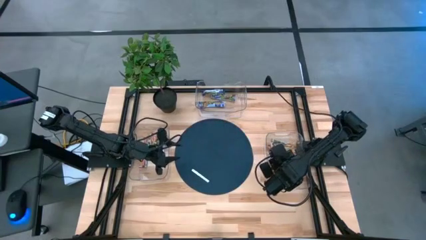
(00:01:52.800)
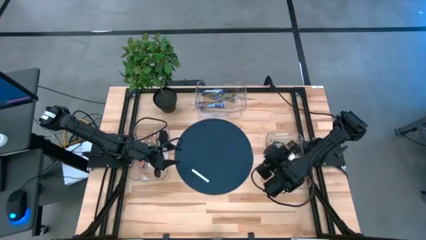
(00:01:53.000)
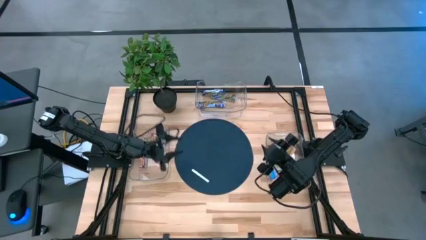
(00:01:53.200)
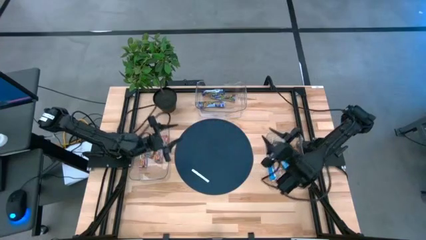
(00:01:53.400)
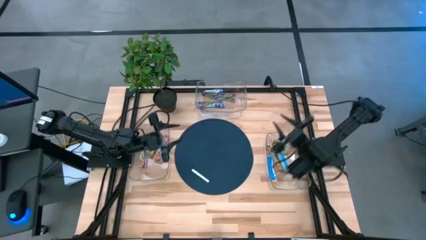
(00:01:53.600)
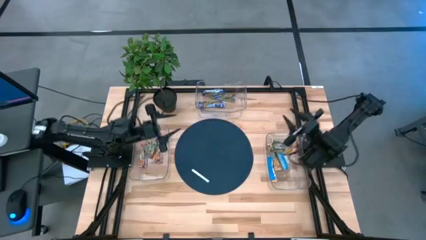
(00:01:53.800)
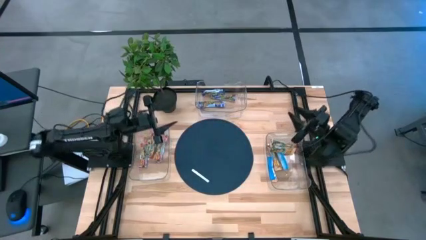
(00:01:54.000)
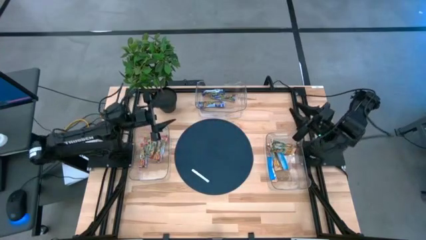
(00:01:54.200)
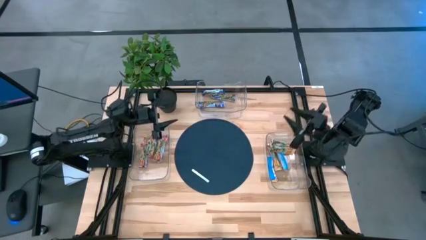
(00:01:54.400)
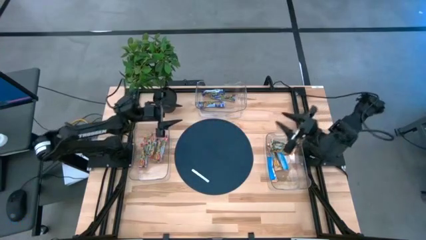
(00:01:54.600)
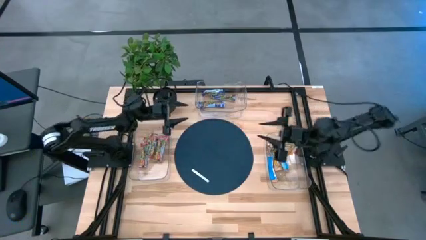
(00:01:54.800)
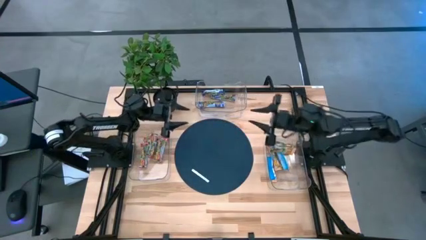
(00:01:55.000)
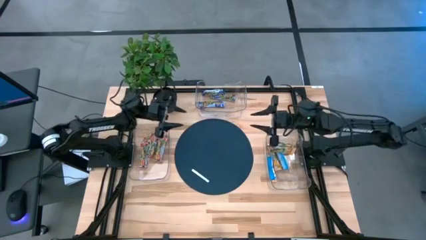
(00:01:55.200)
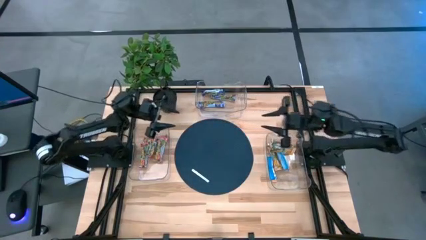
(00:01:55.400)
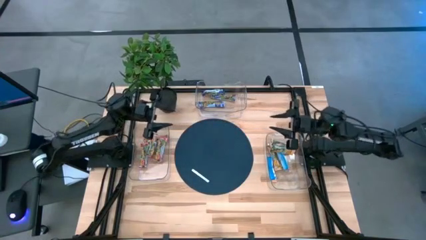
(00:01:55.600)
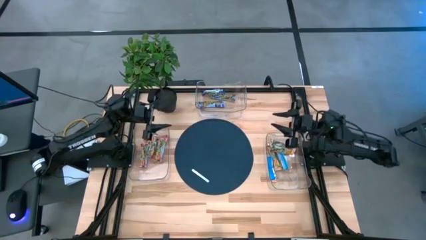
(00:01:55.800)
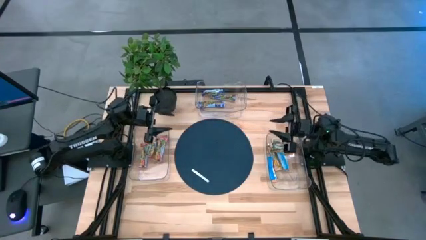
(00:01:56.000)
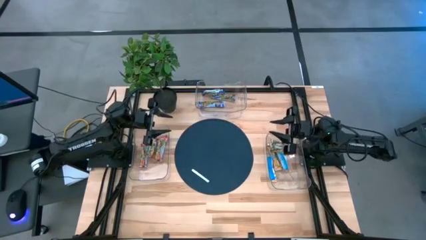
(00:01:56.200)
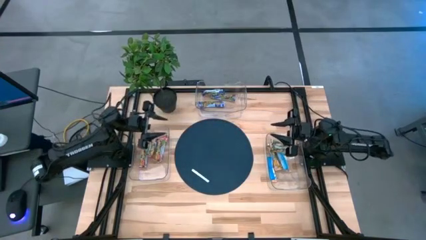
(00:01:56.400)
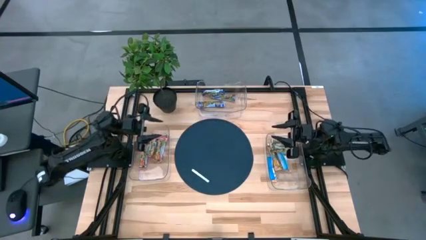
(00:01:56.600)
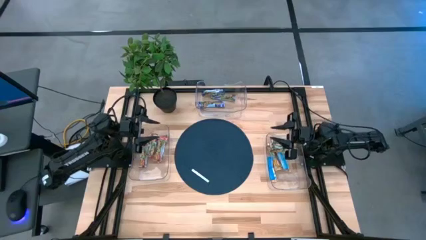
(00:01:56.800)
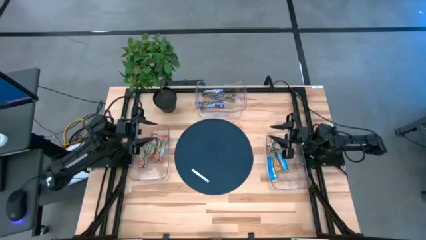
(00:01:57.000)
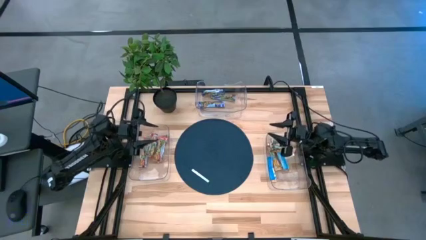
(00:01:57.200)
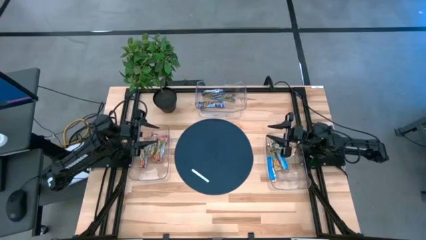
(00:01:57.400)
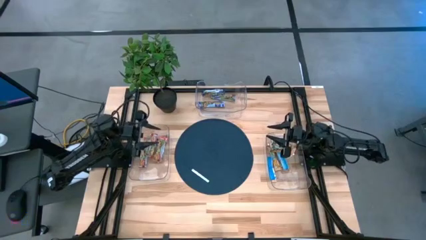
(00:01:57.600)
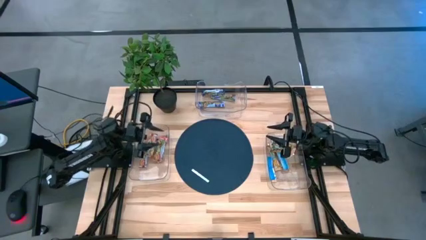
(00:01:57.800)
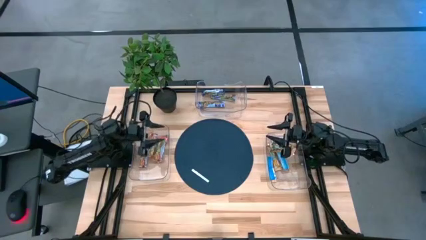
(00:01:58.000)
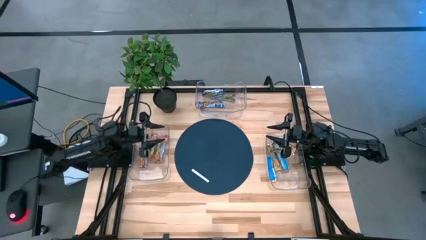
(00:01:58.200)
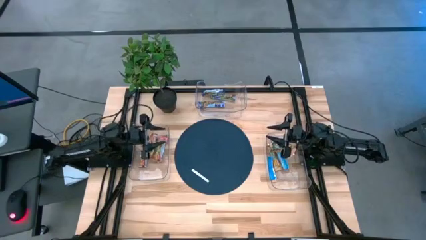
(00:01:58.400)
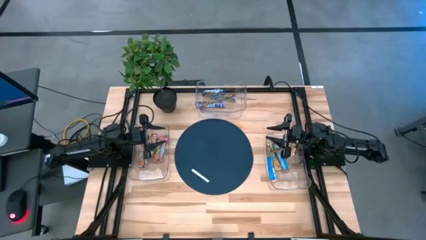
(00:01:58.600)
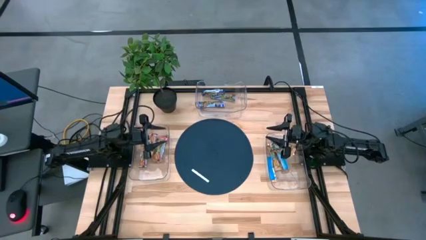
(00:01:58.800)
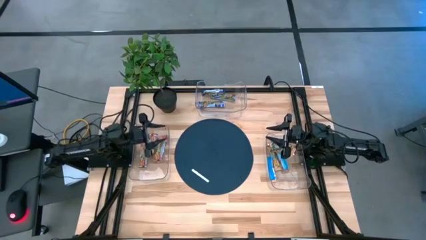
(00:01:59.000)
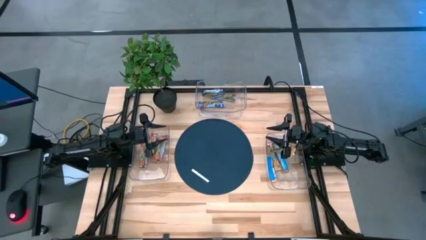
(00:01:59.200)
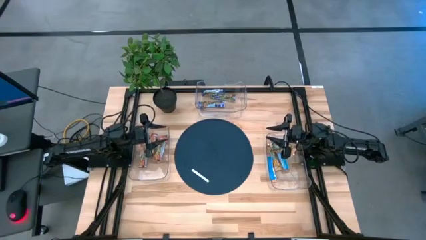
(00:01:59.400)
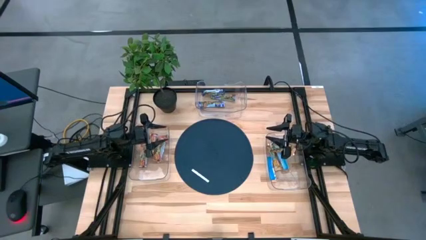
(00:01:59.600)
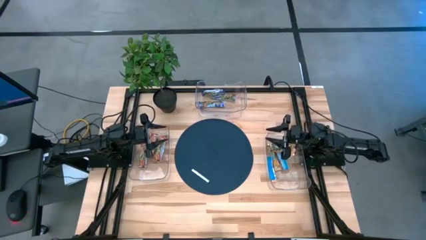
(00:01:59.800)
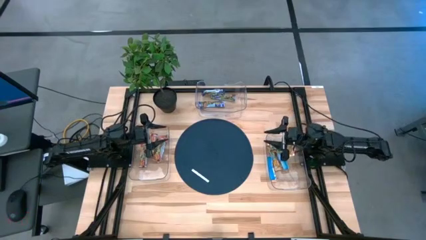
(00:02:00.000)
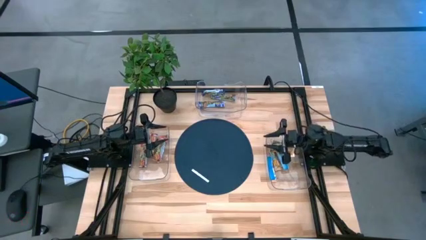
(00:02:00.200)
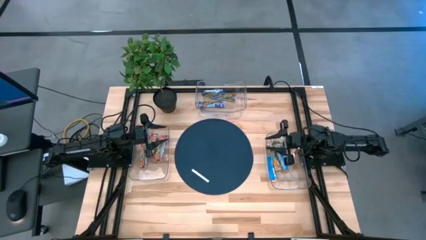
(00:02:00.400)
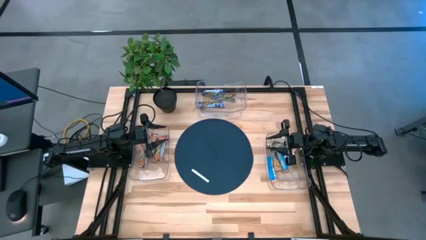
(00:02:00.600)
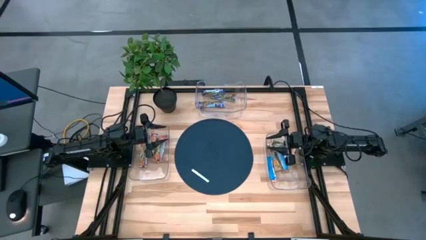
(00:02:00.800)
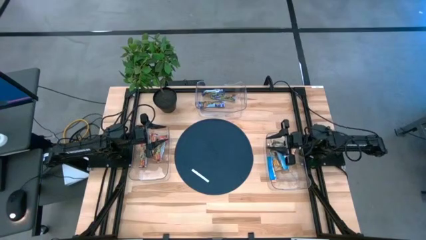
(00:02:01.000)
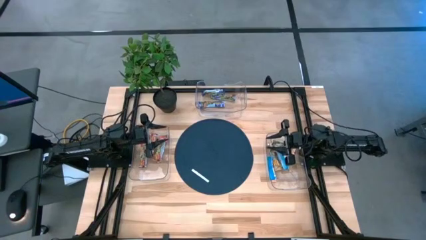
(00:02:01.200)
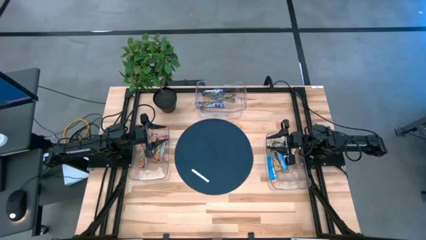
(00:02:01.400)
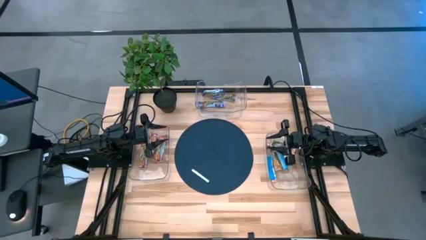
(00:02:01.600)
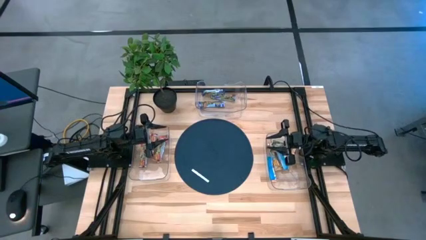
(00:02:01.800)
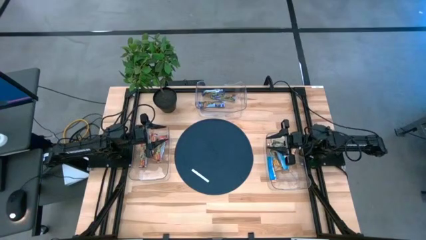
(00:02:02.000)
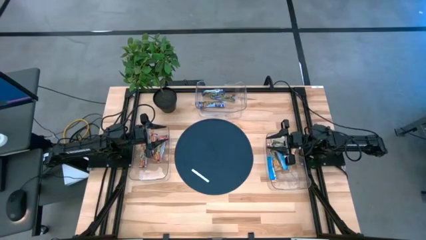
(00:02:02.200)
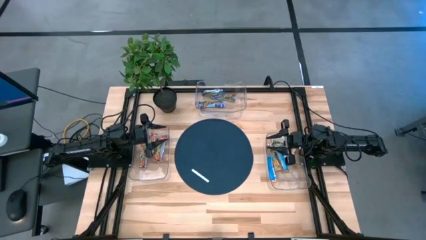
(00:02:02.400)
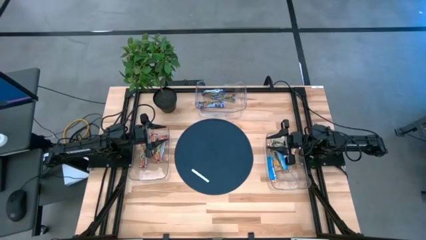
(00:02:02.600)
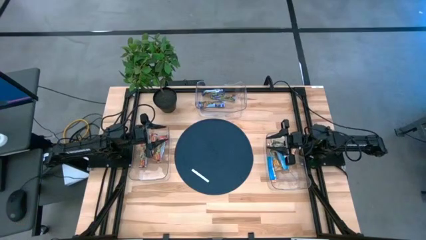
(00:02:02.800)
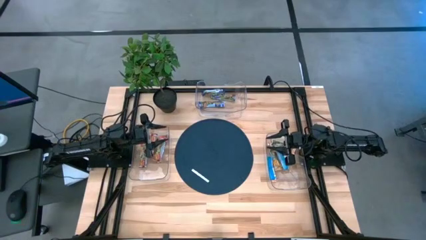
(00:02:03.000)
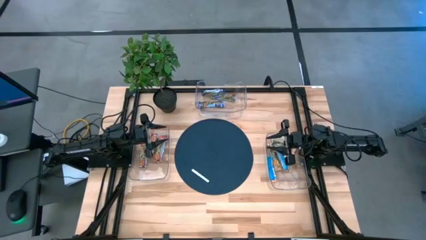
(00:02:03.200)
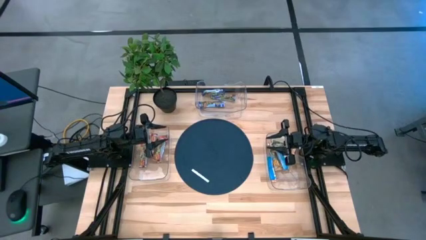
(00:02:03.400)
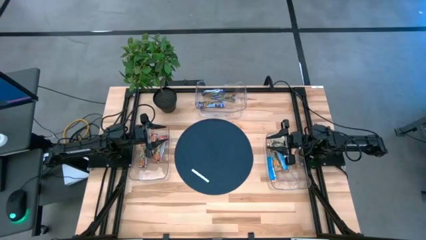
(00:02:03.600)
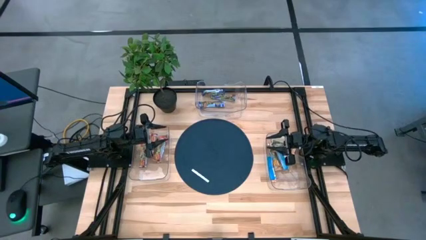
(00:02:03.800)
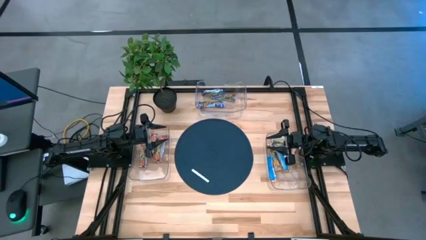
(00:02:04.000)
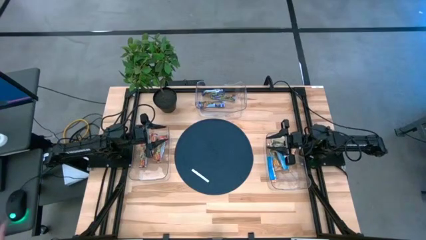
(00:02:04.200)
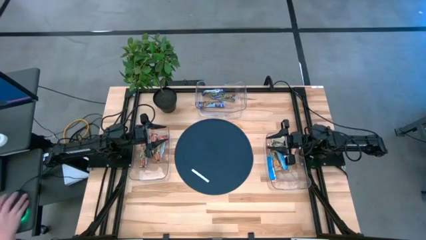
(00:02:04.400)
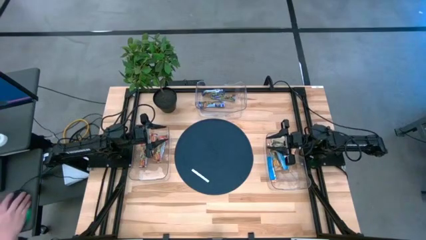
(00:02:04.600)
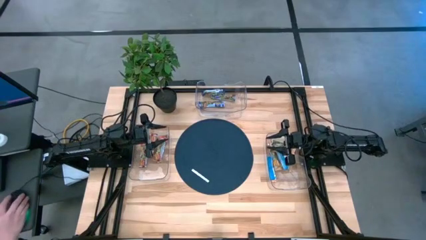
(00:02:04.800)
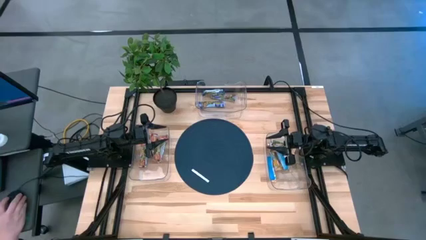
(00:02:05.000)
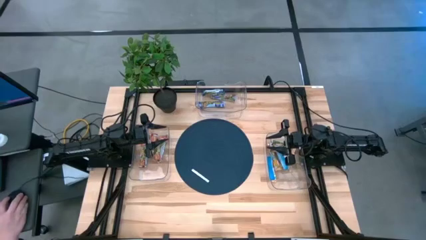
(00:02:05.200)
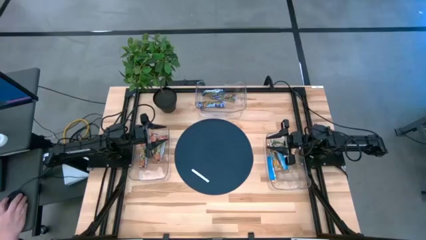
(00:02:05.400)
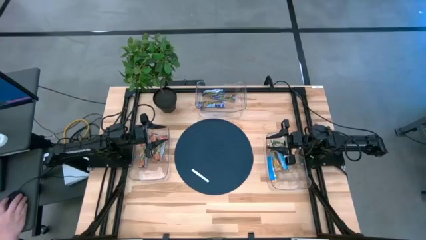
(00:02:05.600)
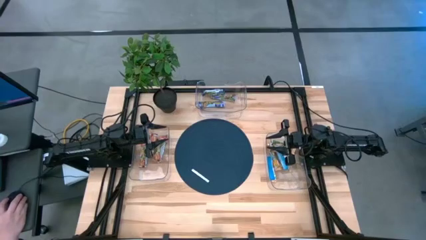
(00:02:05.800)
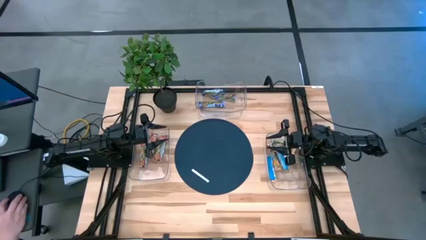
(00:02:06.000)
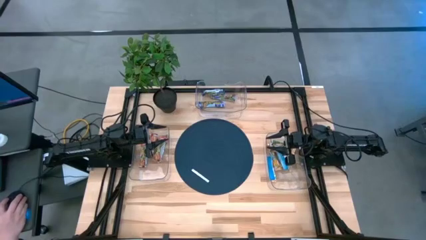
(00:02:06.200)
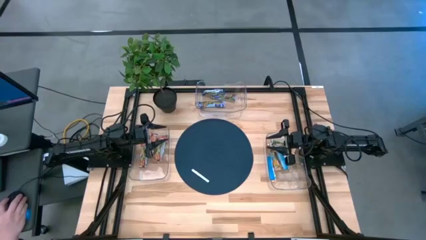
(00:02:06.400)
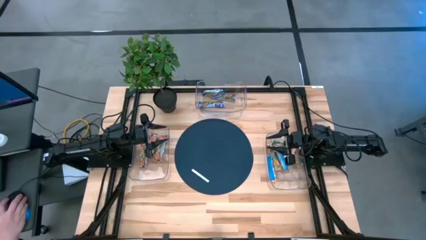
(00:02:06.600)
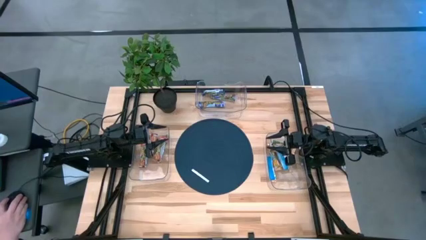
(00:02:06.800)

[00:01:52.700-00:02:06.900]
Task: Pick and place Granola Bars by type
Return to Home Position
